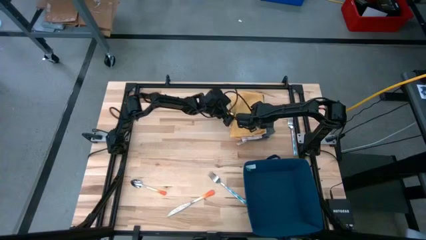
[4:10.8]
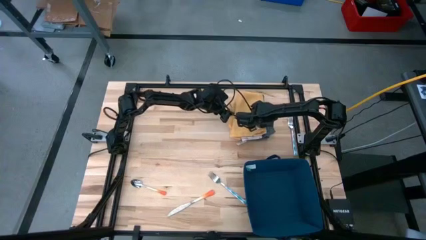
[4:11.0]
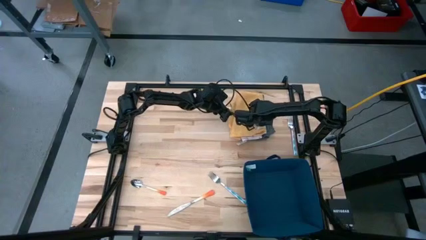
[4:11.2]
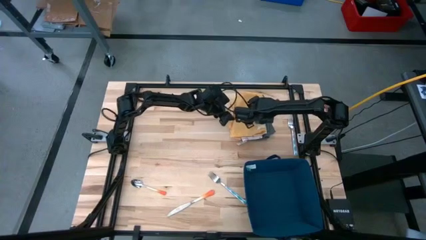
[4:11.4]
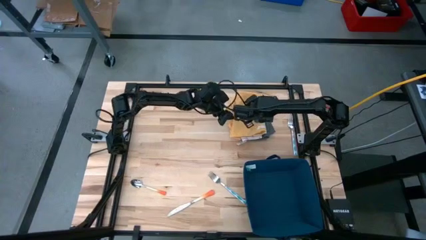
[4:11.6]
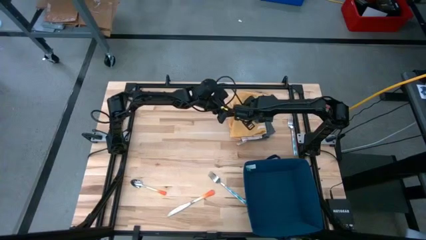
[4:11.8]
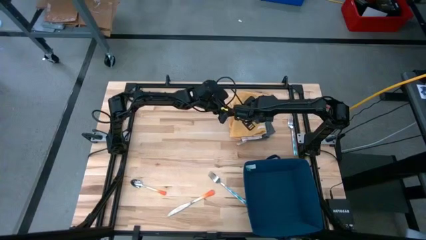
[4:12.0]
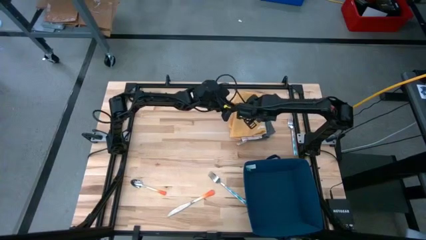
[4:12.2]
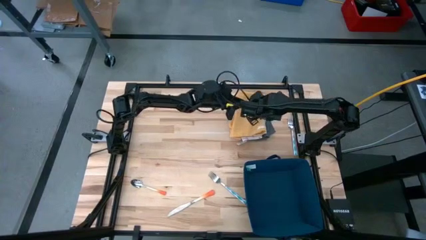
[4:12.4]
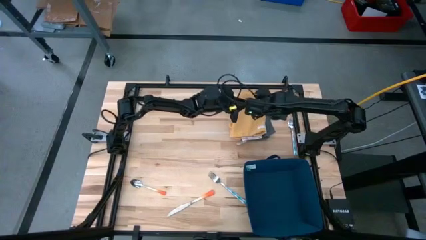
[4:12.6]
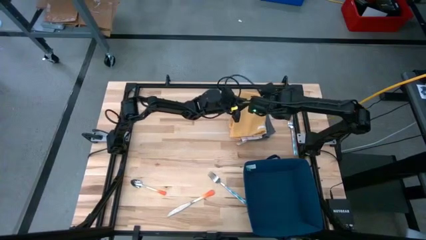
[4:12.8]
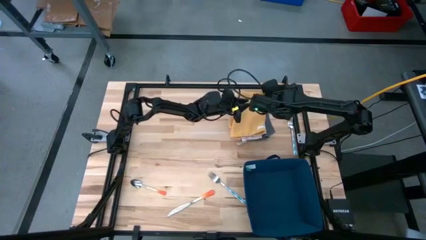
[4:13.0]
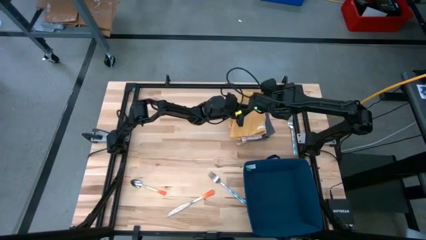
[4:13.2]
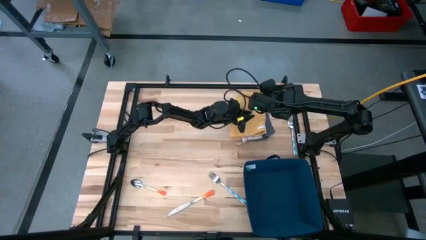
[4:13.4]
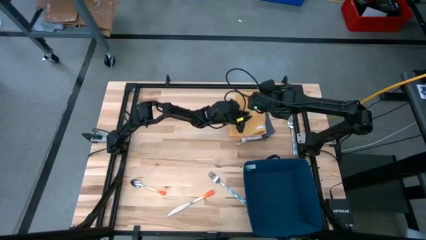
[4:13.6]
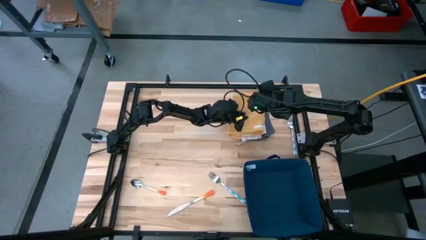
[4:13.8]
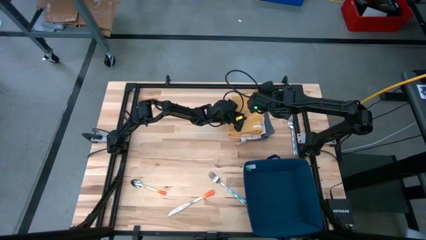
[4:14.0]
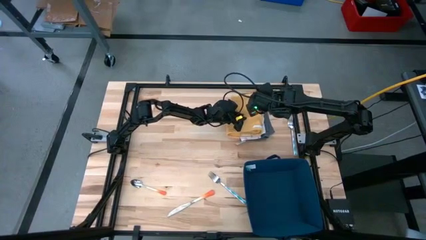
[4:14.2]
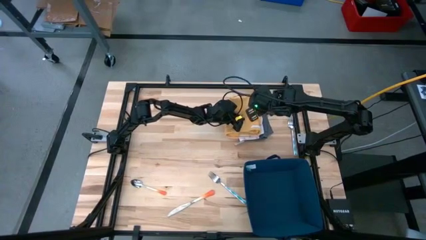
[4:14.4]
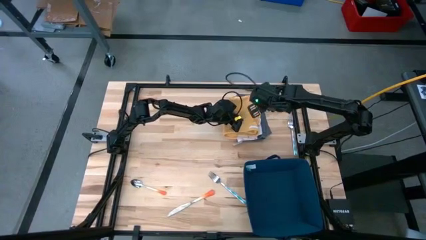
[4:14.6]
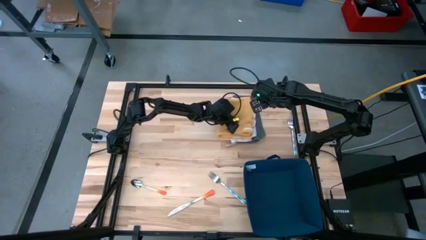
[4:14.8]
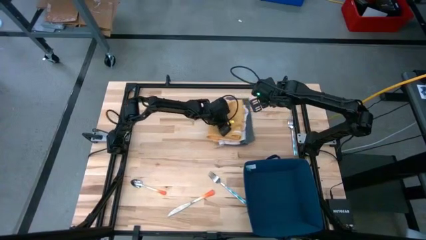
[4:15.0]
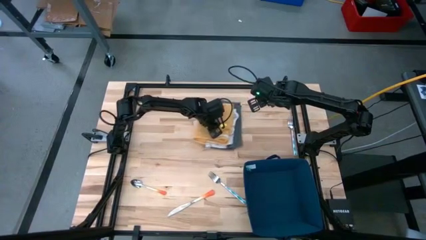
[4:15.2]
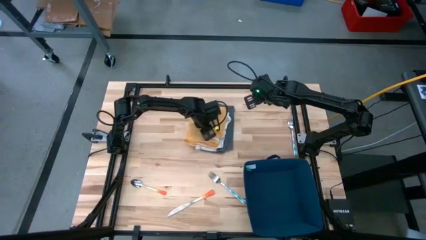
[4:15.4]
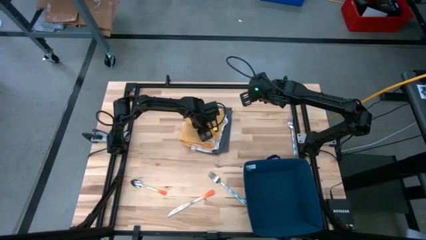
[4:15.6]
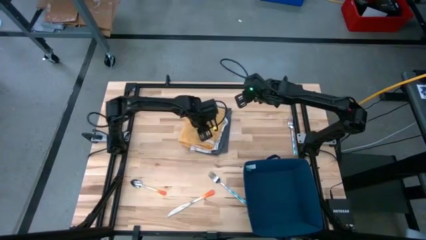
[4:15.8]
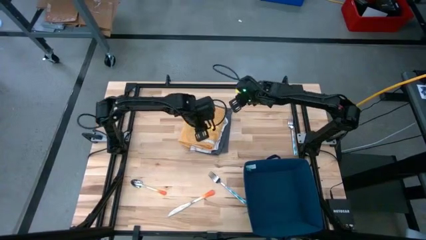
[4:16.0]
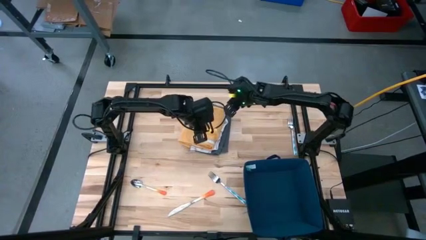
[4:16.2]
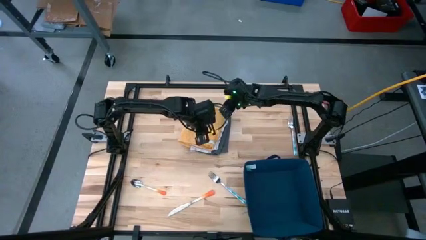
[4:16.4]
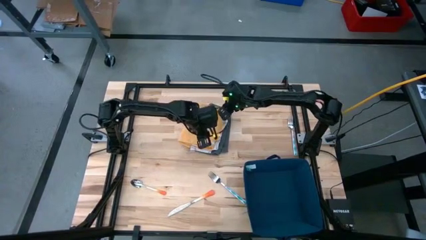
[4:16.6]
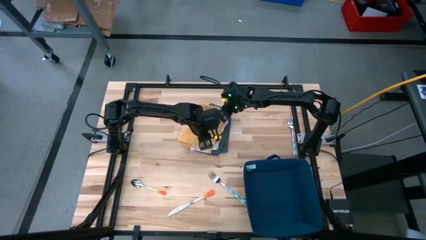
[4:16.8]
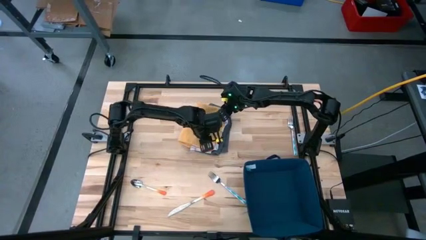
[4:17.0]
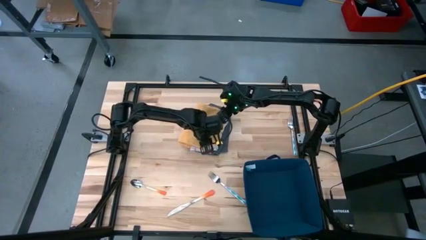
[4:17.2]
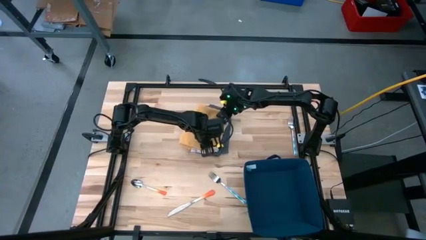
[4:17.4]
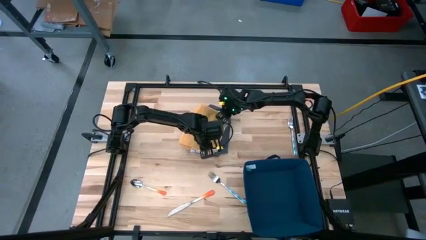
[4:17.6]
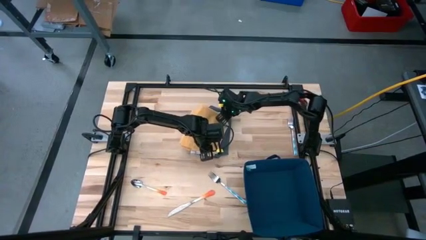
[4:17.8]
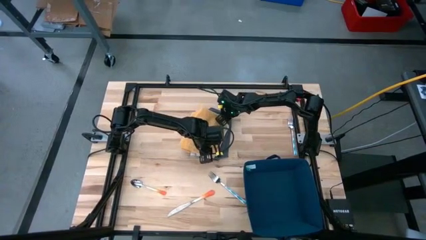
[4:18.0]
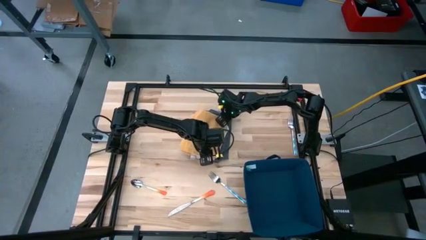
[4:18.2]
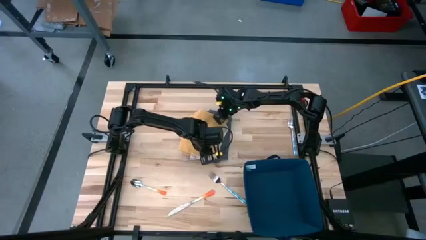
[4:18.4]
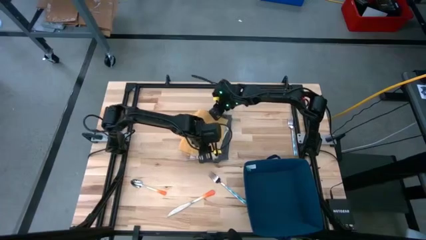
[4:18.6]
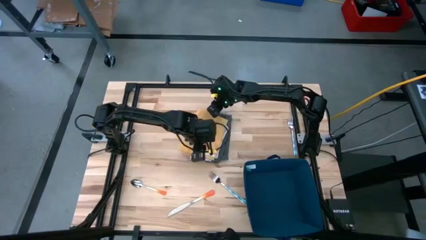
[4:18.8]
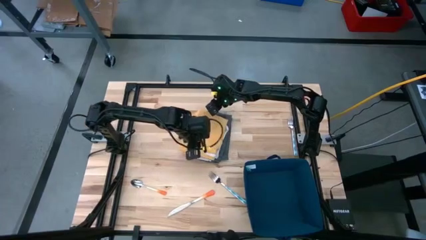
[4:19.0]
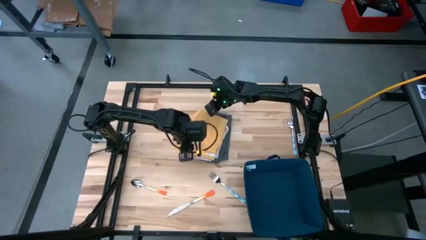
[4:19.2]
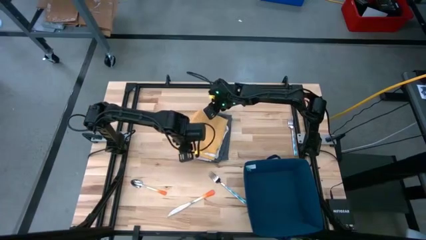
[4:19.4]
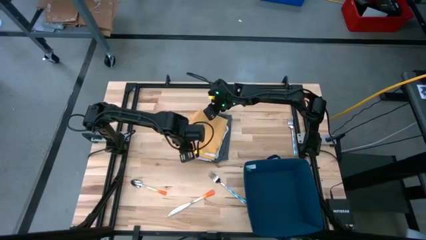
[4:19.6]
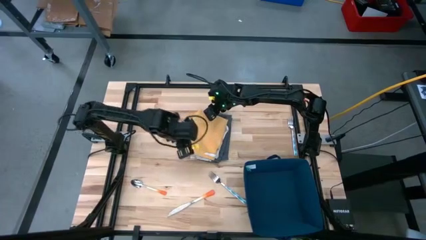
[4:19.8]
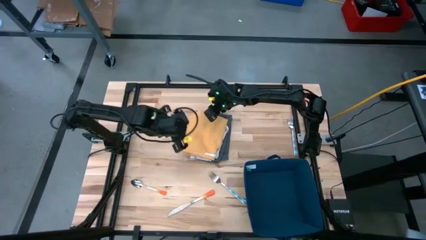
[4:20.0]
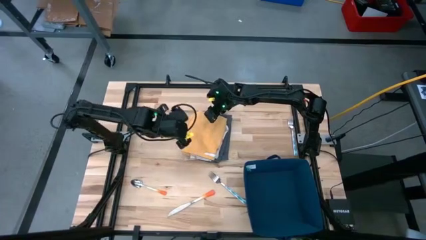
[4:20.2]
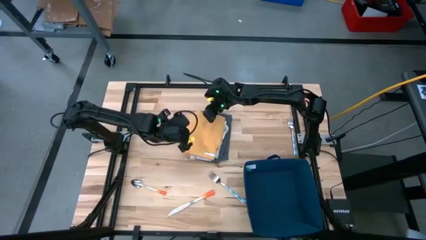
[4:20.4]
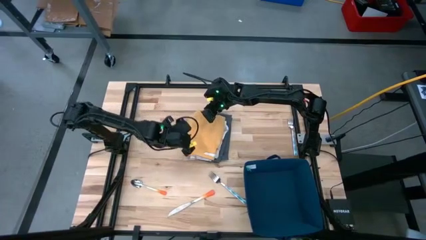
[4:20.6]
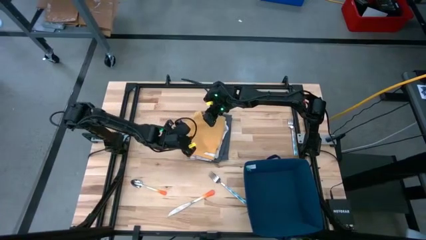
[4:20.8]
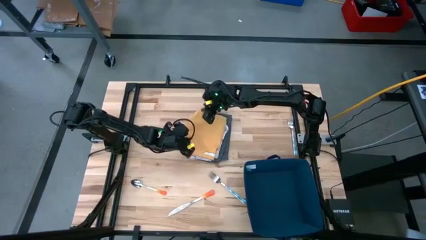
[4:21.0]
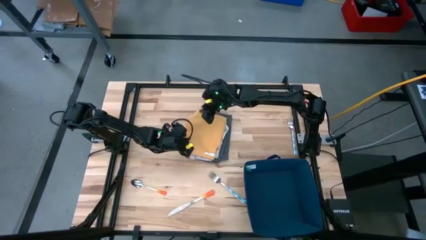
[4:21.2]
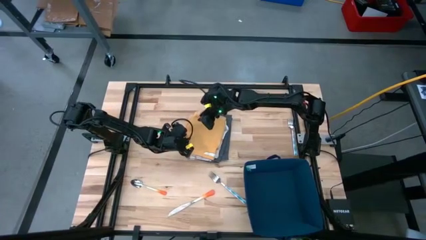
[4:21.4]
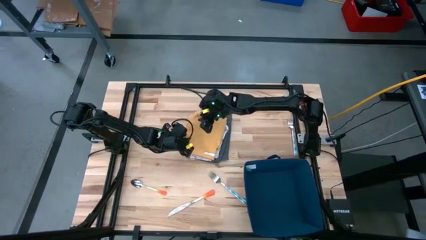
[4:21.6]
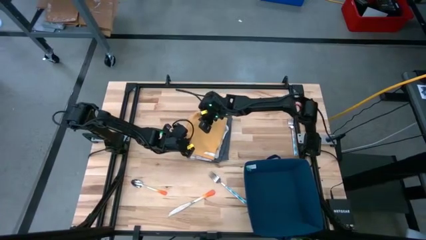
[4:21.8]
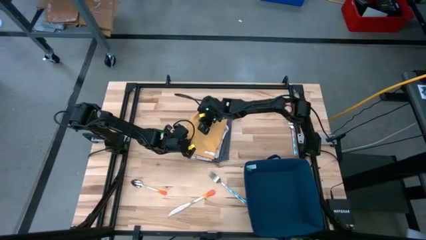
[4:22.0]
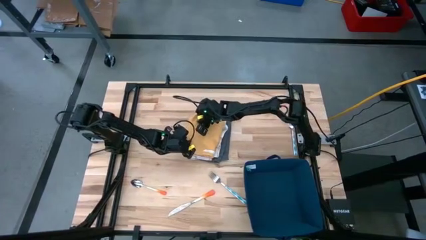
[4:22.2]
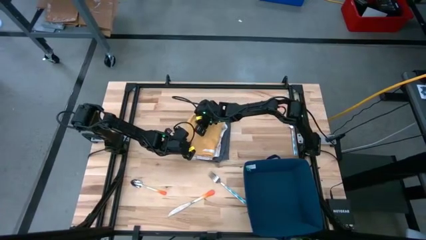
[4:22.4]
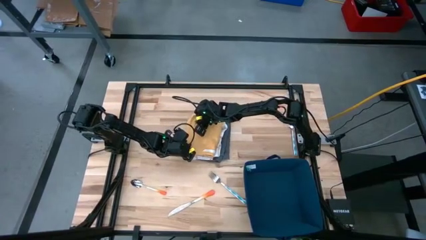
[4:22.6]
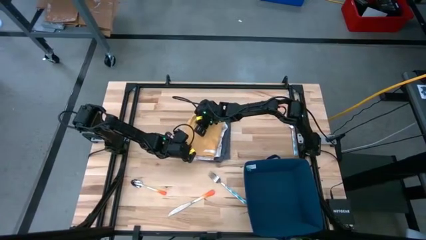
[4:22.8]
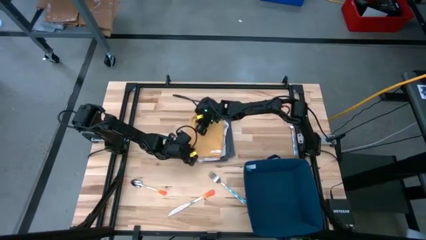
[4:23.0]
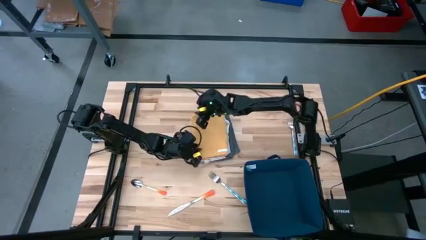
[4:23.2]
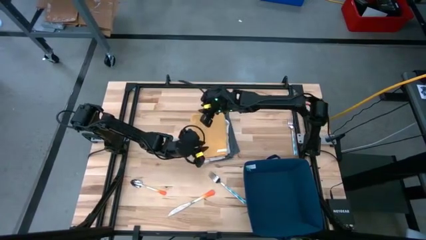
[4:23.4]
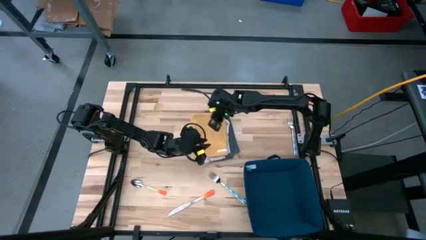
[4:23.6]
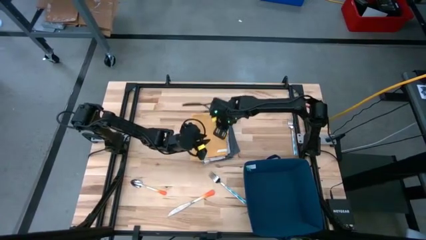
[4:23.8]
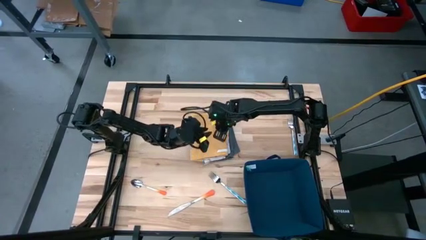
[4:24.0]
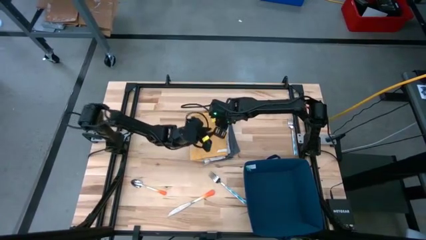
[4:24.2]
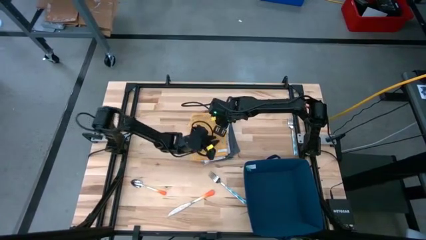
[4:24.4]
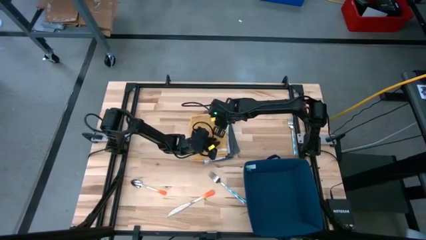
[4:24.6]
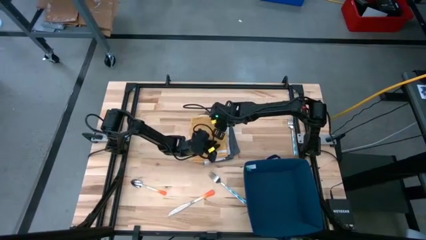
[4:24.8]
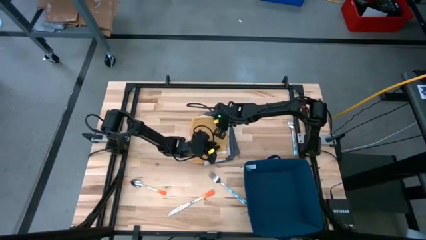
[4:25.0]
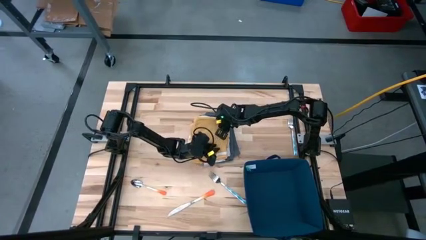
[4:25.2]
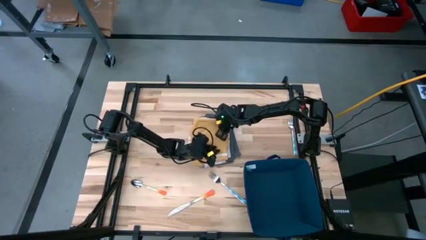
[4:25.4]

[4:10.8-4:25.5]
Task: Fold towel
Move the stacked towels to the center of the table
